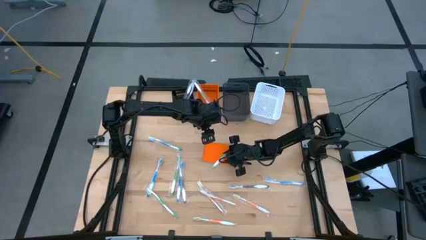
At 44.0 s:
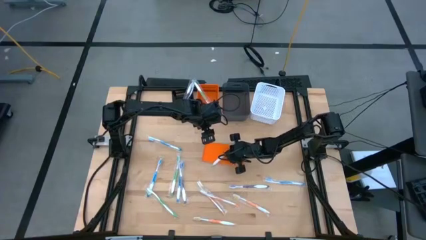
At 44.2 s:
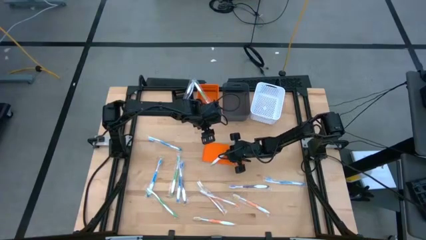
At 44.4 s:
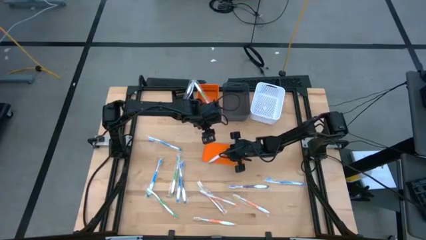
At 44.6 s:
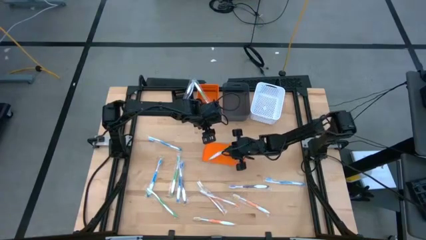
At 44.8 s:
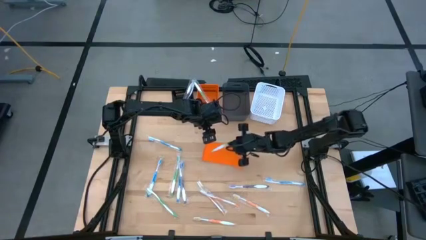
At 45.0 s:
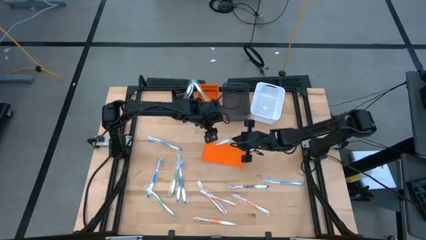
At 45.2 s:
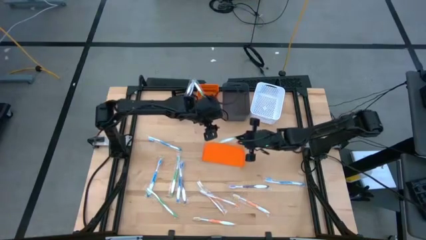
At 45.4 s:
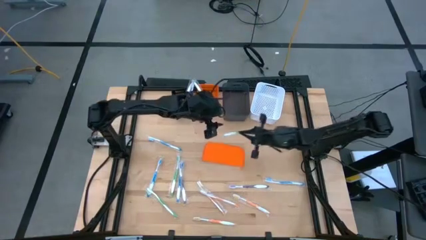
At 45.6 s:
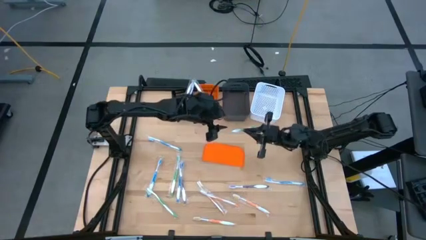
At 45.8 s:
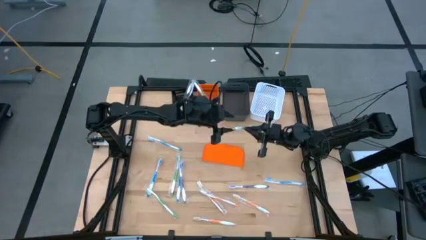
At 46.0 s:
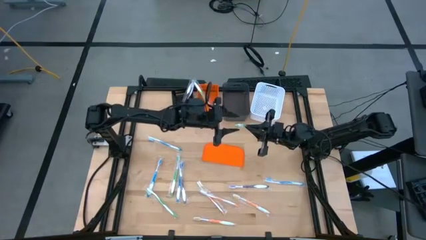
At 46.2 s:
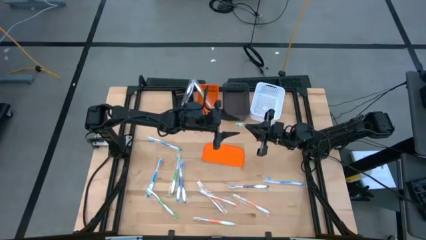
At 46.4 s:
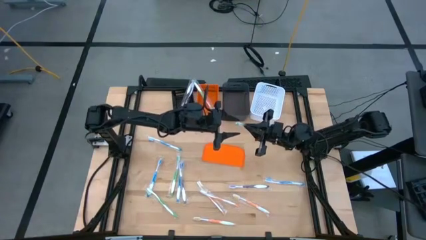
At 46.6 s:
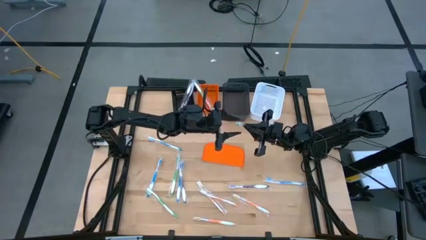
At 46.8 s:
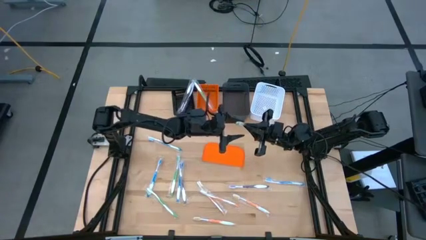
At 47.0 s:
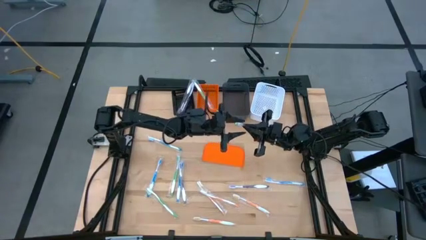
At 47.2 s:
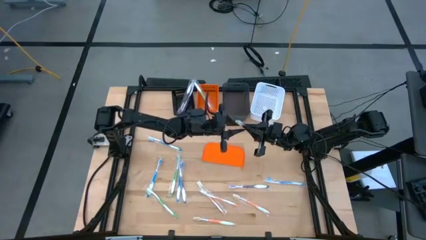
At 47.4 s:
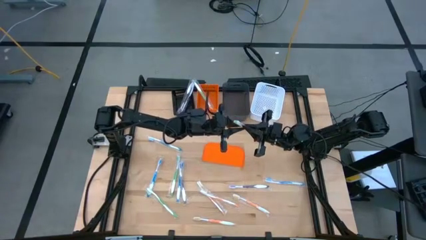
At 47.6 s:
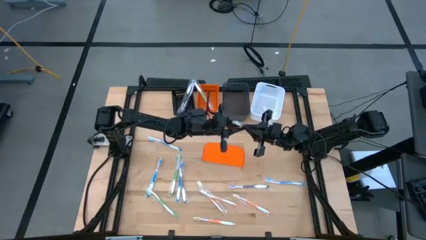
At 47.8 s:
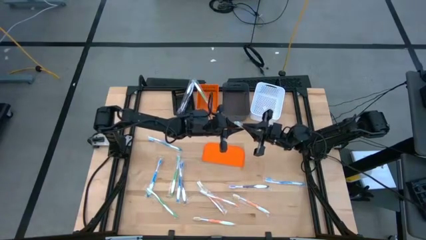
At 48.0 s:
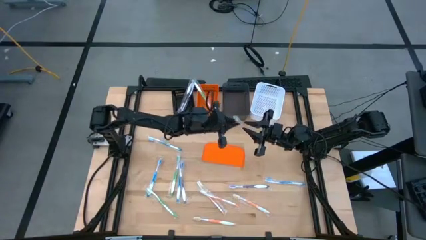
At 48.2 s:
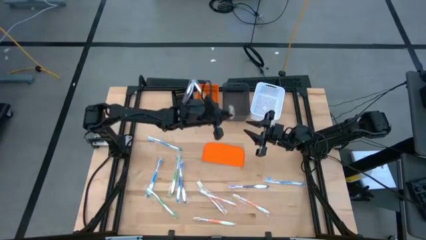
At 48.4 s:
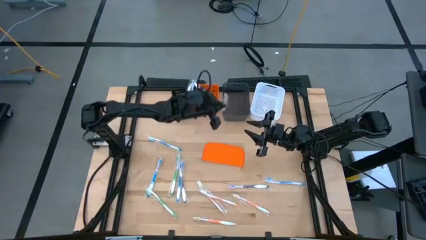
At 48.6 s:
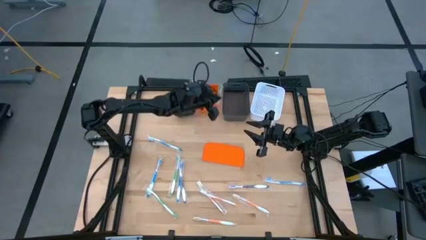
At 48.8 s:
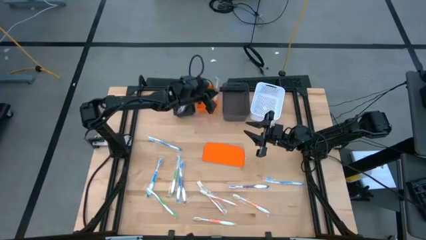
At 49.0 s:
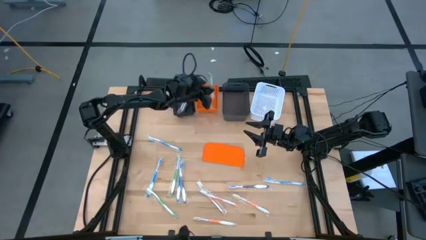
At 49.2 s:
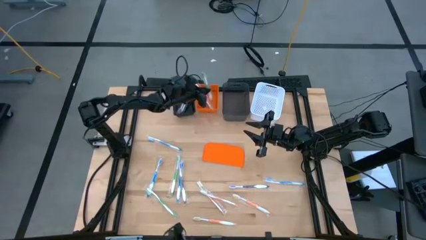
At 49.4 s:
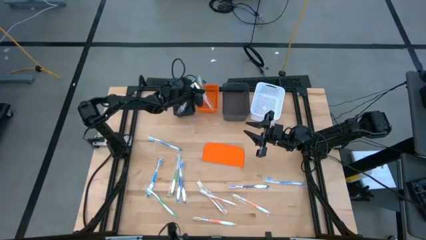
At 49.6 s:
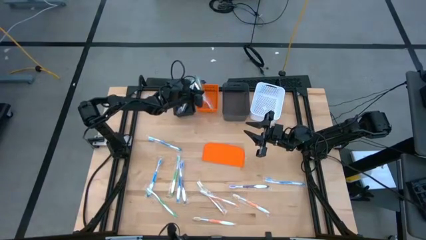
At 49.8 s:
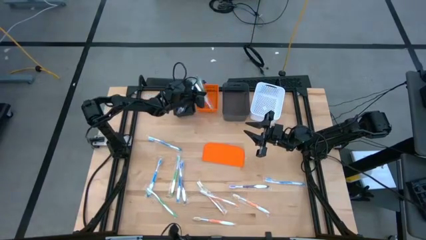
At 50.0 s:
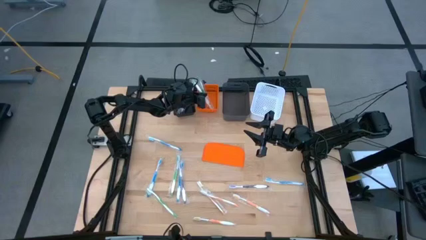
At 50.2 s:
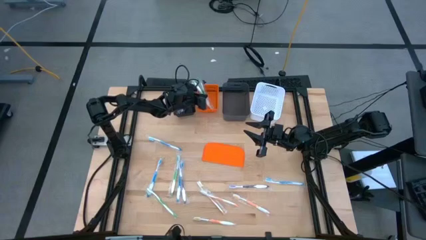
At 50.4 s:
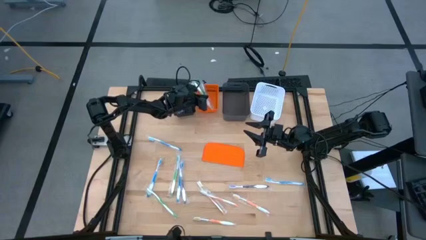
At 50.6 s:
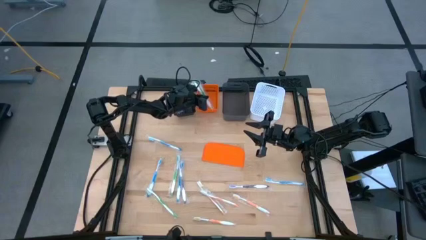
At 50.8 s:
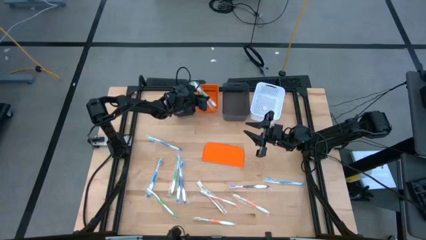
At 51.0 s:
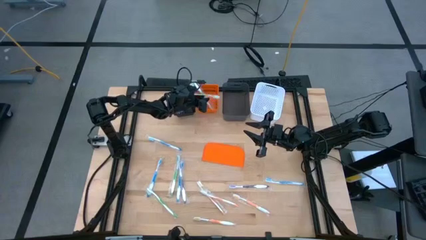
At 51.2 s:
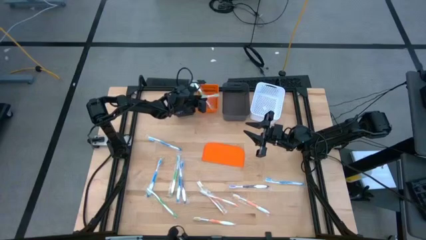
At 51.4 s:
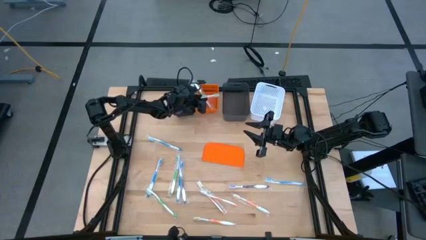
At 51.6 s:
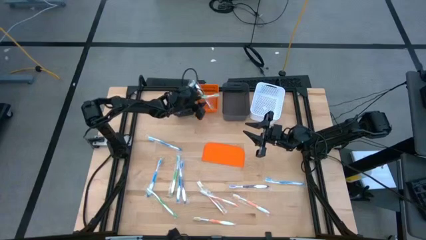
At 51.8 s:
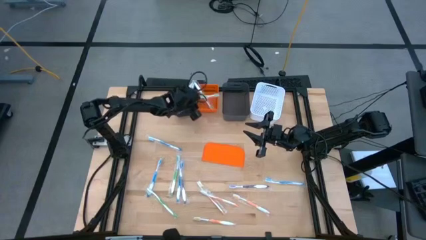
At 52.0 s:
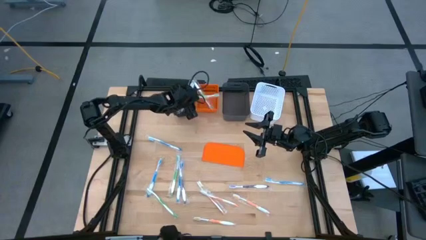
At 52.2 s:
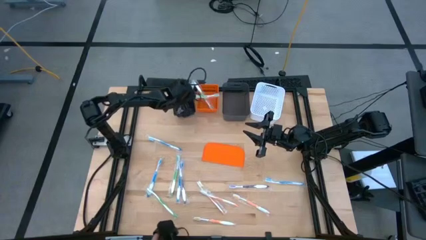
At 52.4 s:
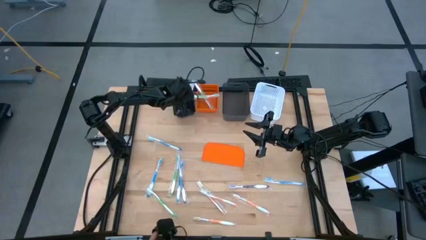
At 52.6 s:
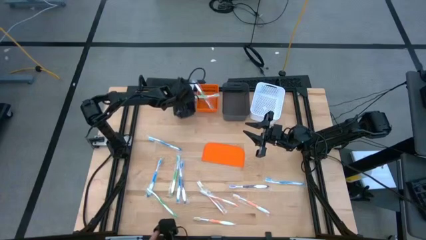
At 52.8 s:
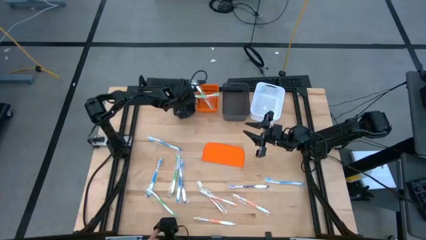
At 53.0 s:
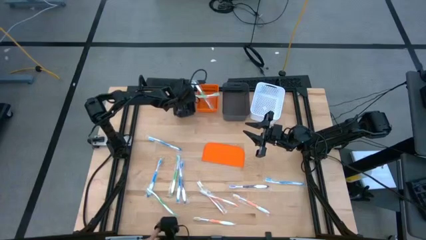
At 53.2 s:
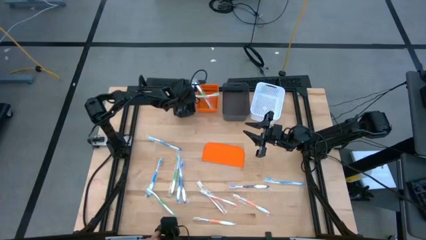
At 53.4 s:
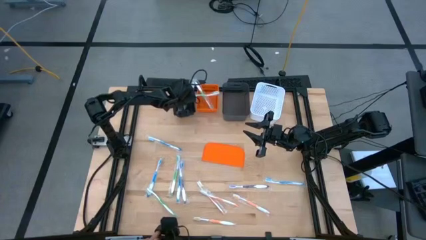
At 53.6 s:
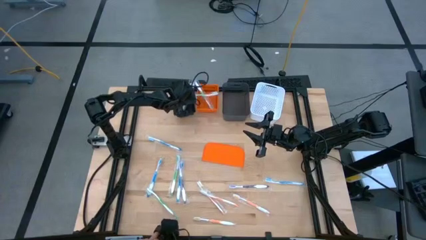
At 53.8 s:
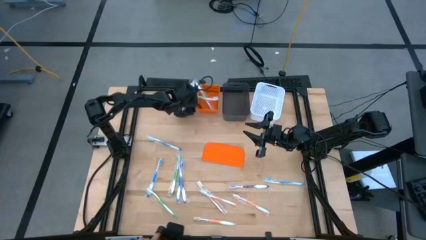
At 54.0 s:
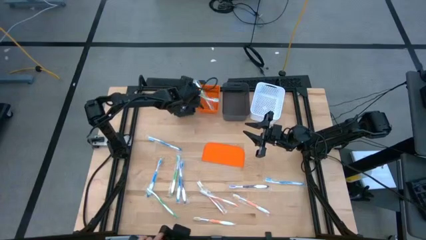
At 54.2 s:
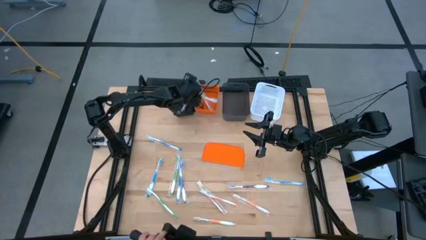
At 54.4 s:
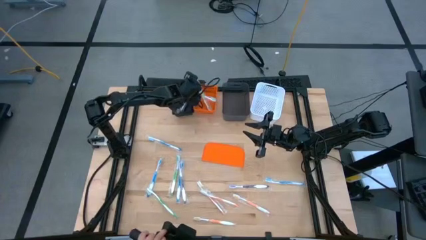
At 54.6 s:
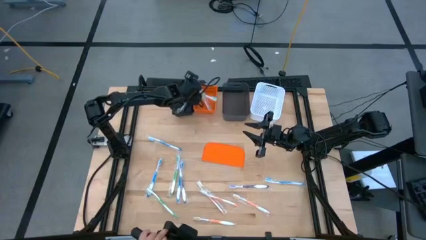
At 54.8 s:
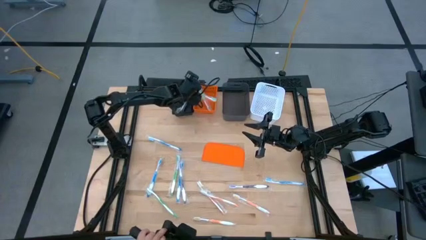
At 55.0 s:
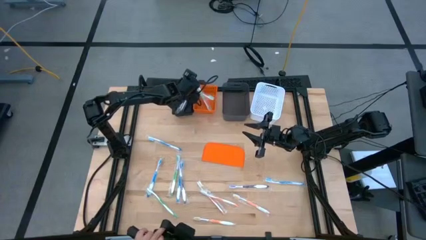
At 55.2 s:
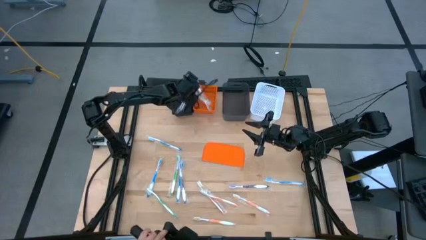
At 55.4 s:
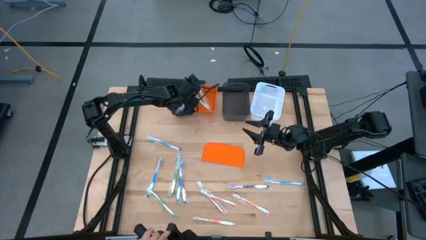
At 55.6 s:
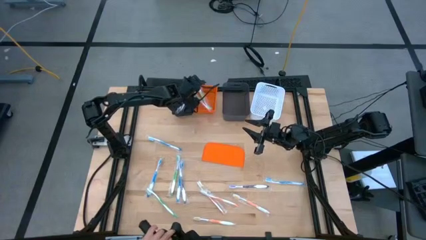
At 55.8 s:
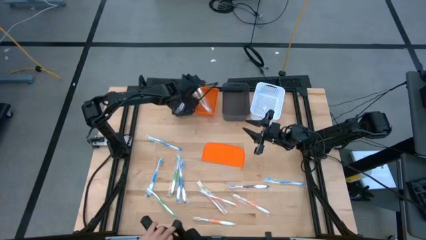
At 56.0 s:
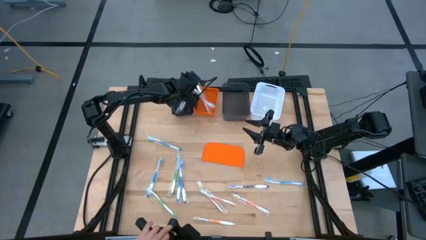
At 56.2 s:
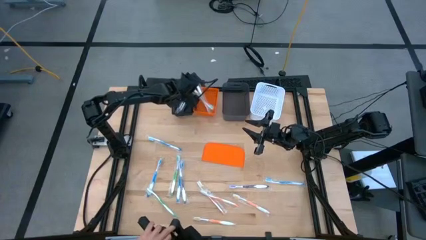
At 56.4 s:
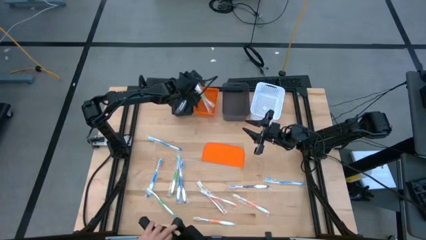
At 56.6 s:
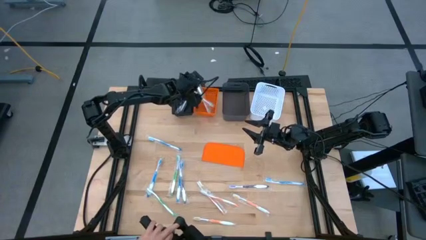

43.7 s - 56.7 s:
Task: Pick & Place Toothbrushes
Put the green toothbrush into the orange bin
